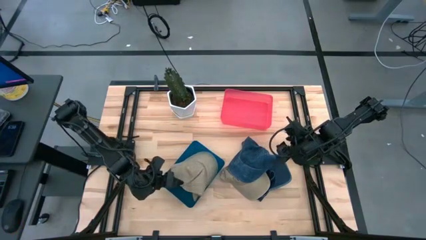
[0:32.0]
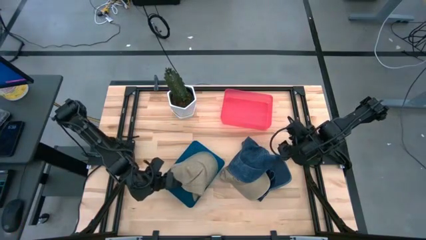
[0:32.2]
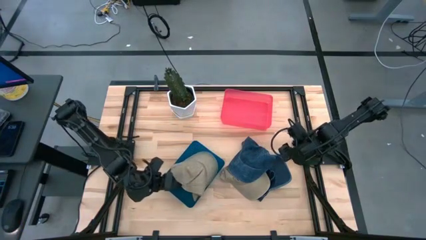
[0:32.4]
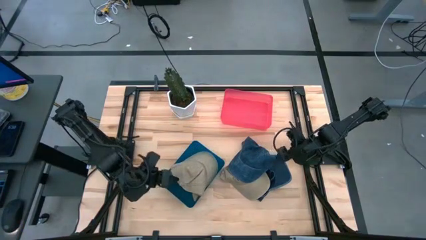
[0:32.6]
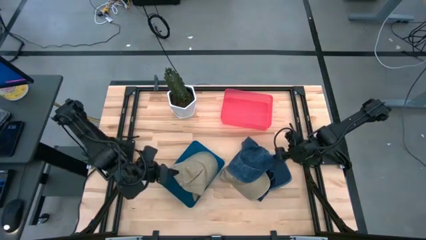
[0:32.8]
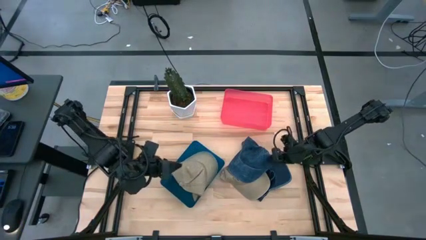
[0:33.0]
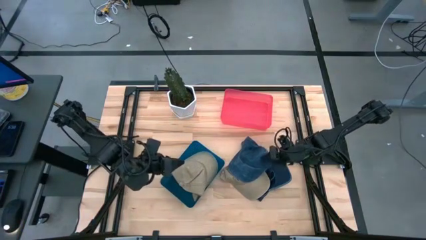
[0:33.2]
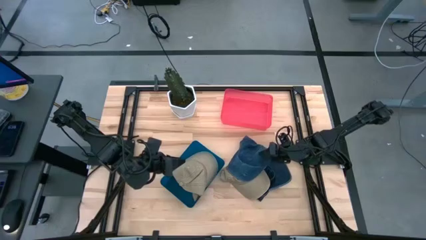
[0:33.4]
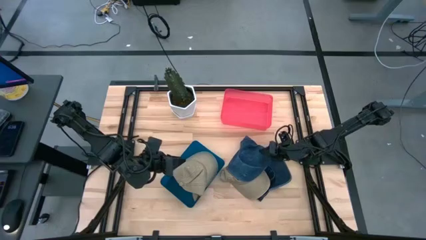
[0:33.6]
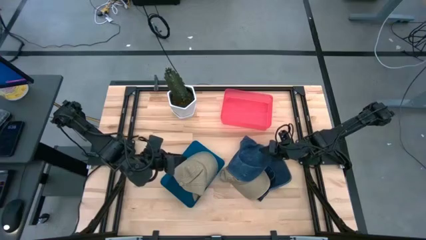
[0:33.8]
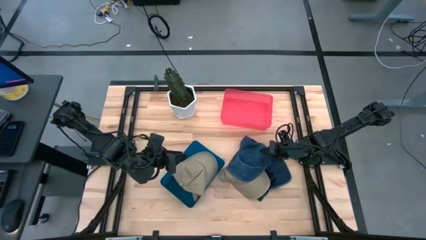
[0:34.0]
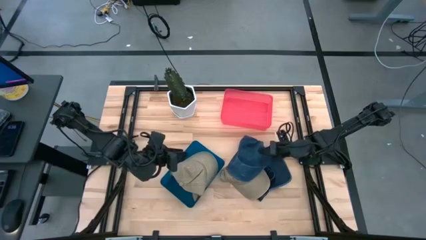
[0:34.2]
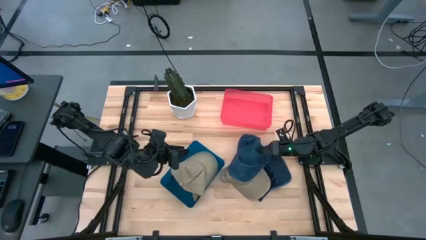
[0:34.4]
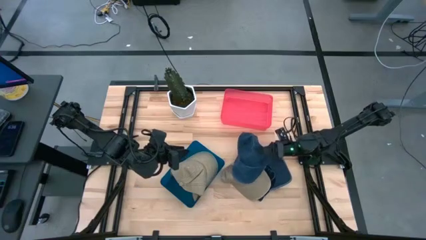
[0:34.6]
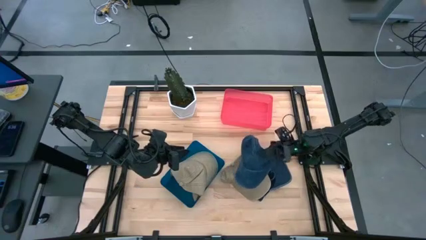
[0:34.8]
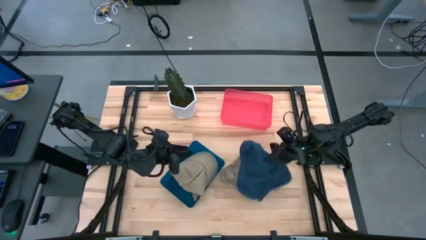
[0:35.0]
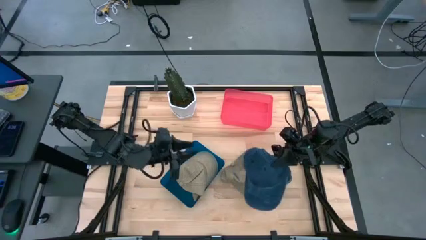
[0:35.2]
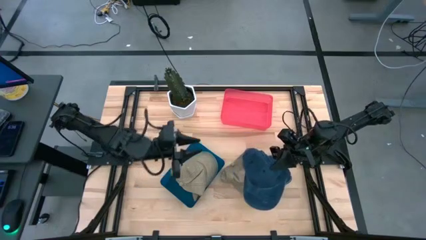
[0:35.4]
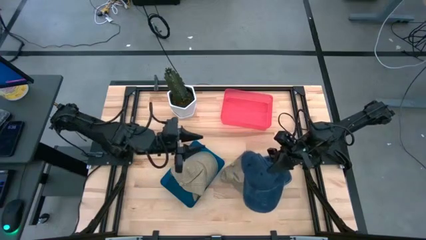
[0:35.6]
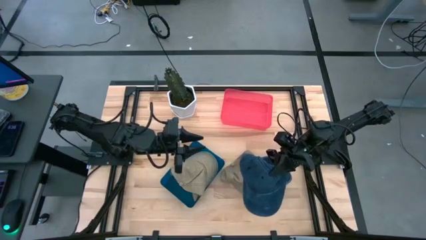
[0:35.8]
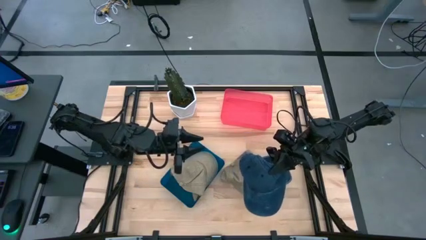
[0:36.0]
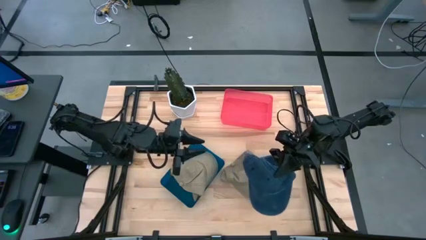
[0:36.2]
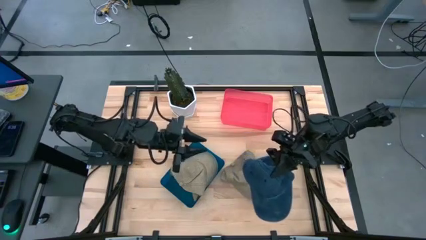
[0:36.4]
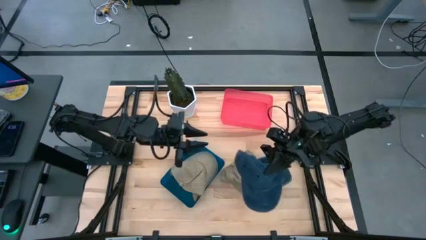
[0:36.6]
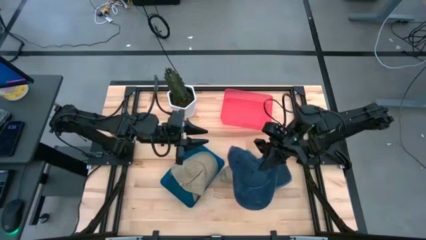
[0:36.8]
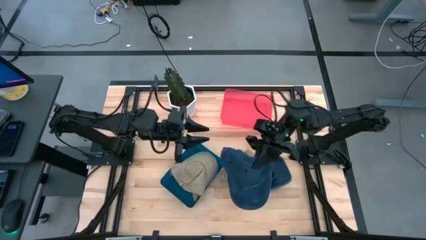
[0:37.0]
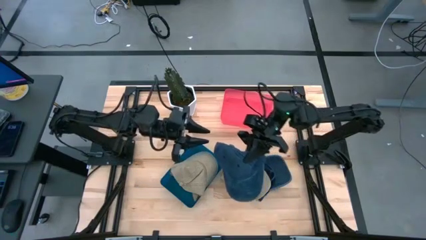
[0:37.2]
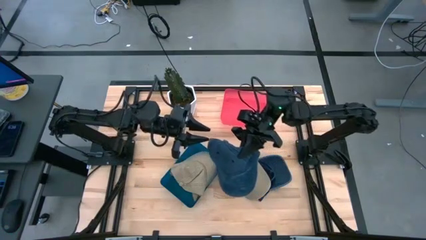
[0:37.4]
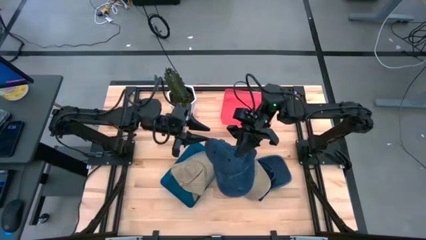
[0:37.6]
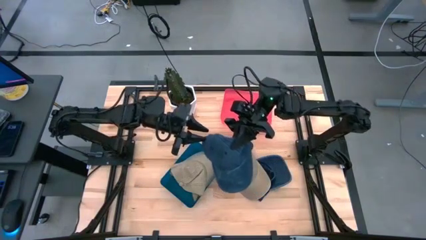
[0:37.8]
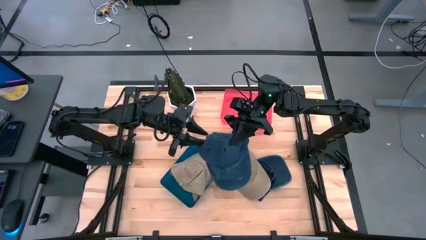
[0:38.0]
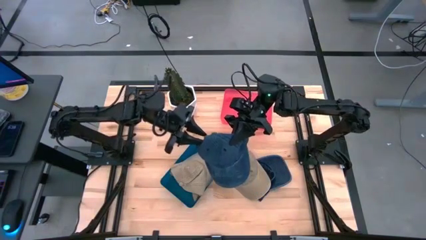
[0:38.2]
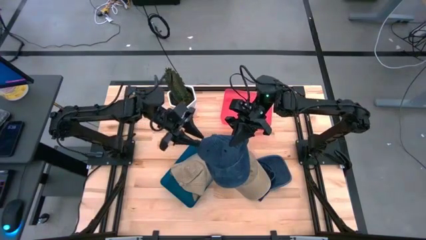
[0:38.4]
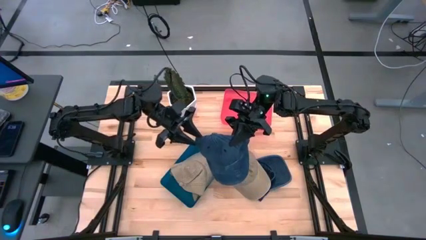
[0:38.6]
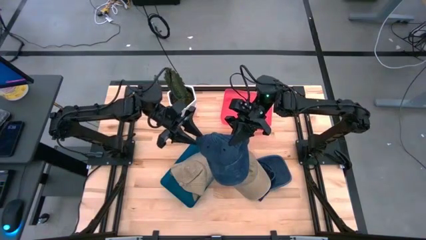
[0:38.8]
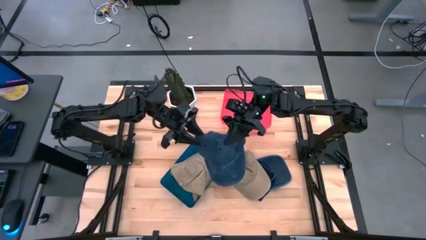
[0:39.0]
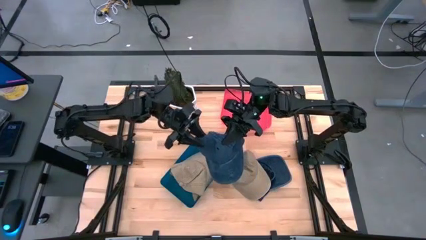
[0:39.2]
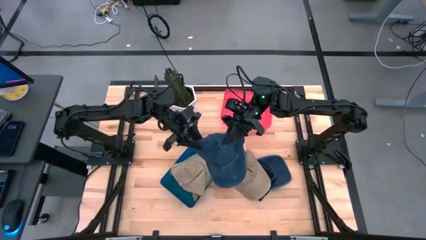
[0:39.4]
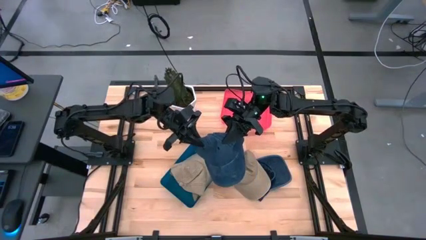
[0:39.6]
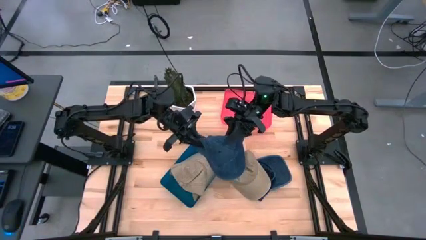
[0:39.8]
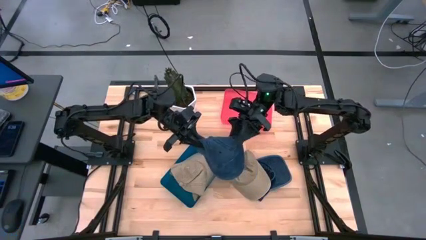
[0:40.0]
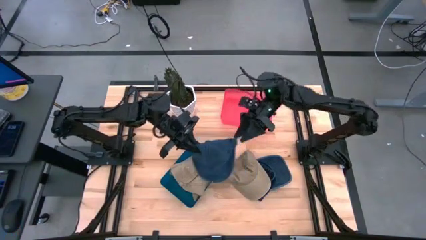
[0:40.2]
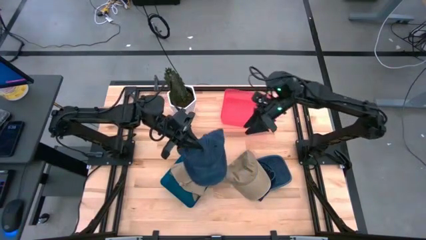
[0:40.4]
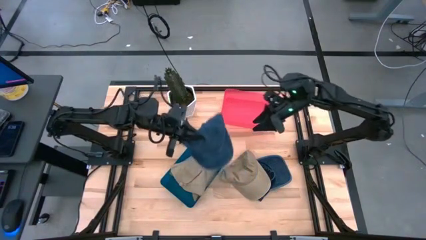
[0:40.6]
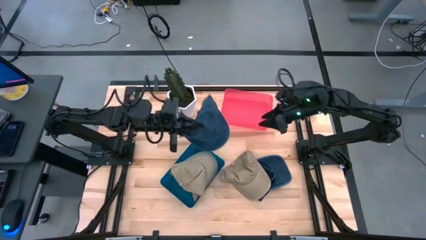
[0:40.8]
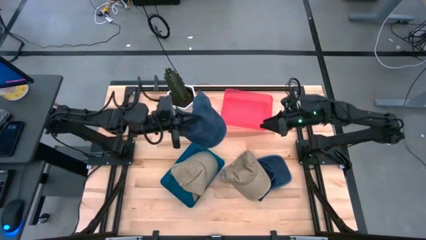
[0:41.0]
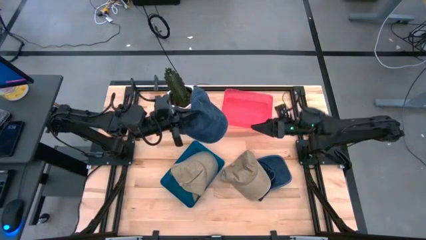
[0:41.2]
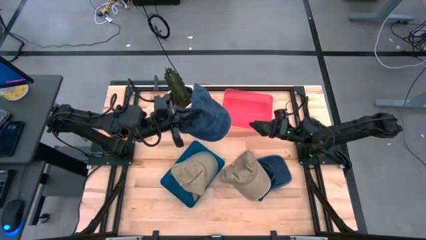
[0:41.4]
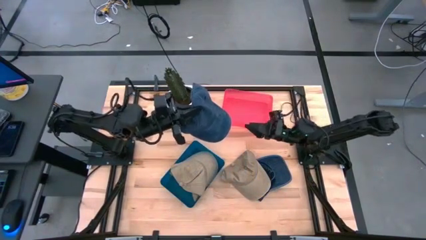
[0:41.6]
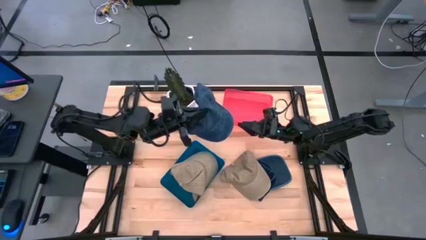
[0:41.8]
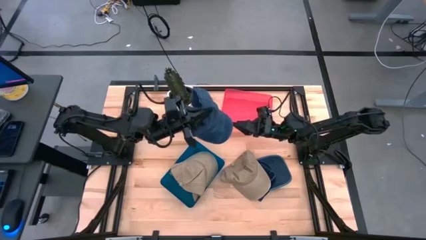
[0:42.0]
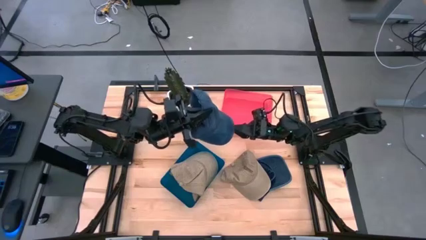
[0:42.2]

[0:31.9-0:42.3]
Task: Pick & Place hat
Put the blue cap into the red bin

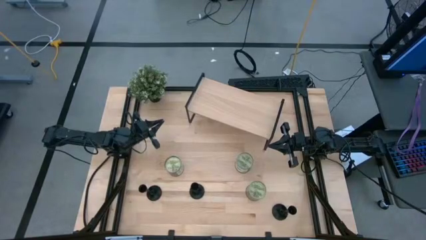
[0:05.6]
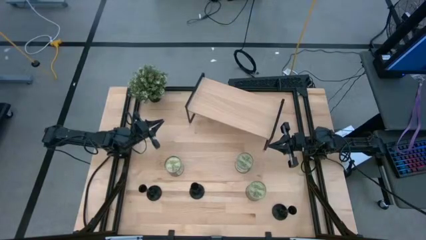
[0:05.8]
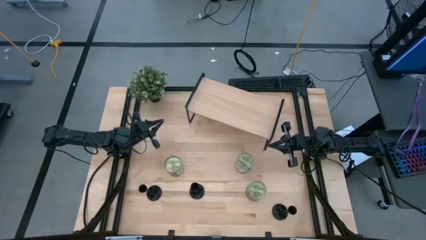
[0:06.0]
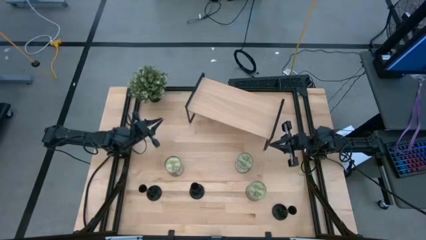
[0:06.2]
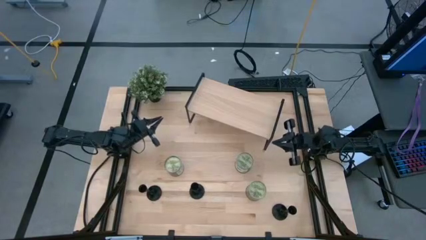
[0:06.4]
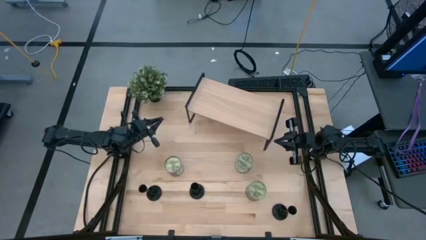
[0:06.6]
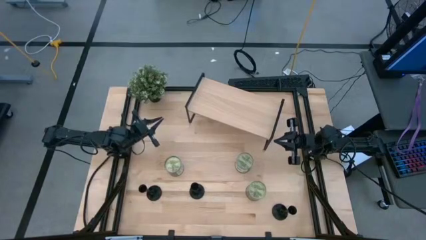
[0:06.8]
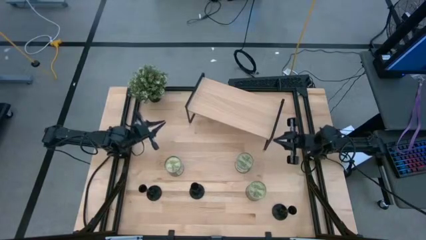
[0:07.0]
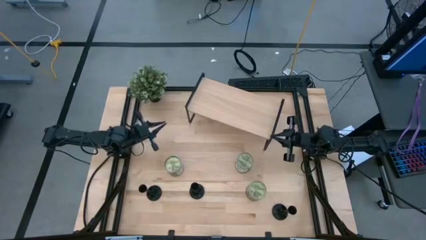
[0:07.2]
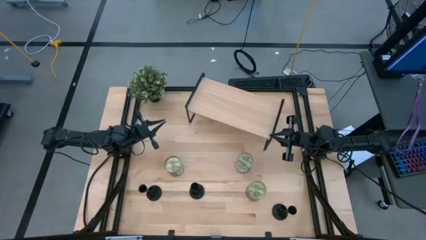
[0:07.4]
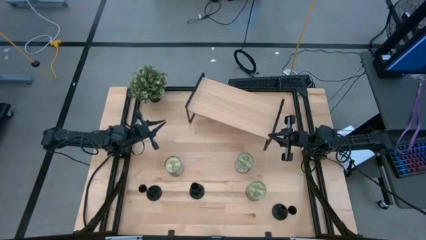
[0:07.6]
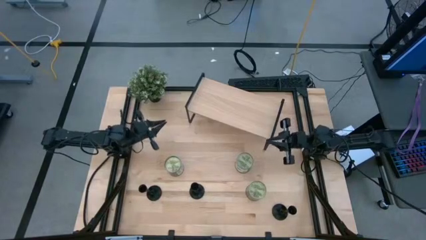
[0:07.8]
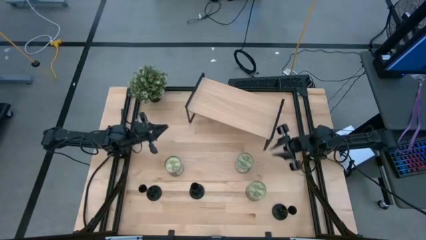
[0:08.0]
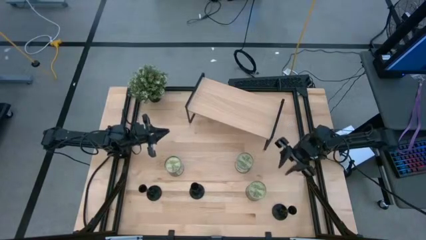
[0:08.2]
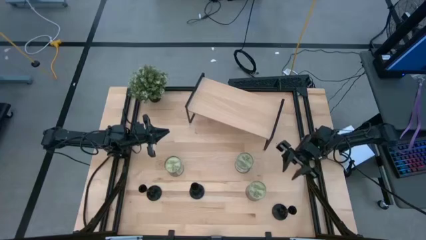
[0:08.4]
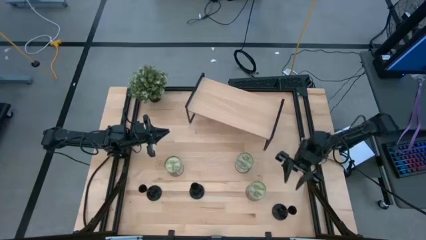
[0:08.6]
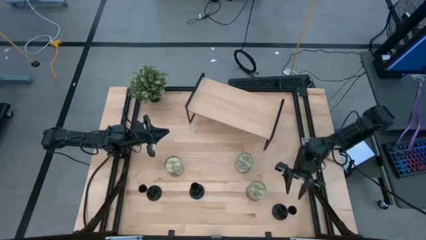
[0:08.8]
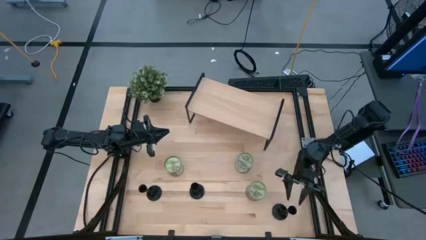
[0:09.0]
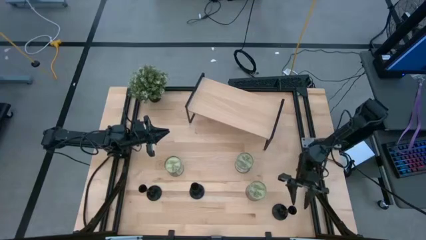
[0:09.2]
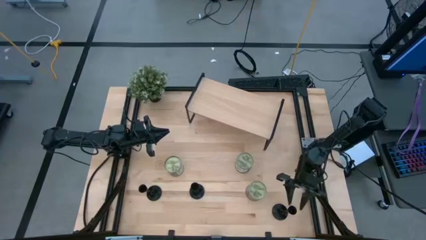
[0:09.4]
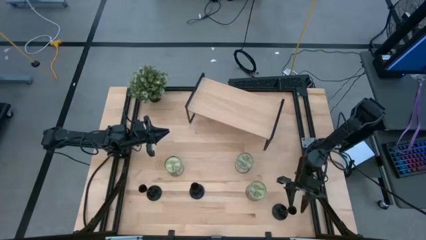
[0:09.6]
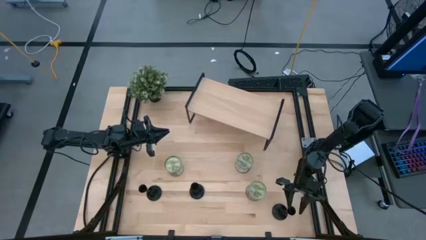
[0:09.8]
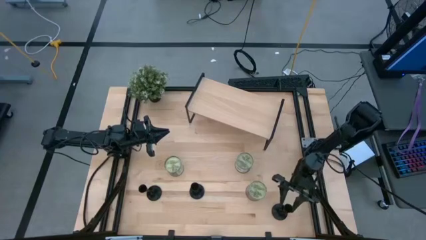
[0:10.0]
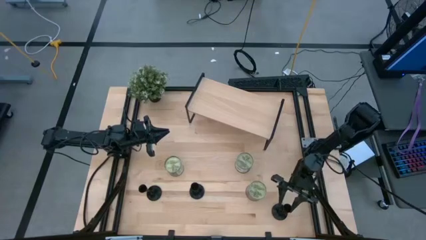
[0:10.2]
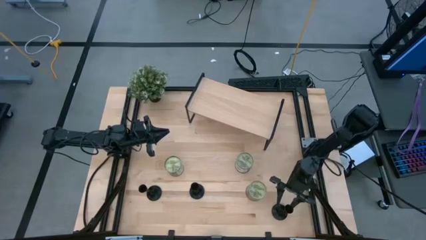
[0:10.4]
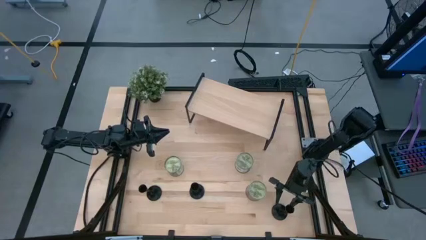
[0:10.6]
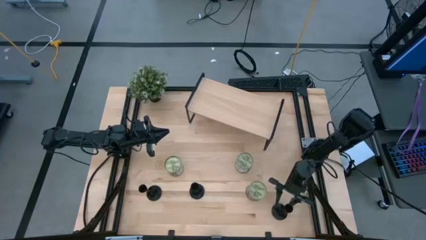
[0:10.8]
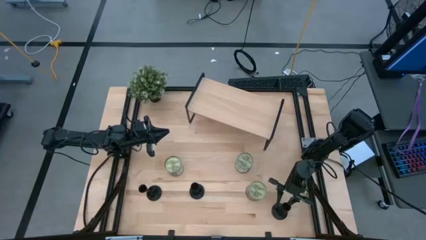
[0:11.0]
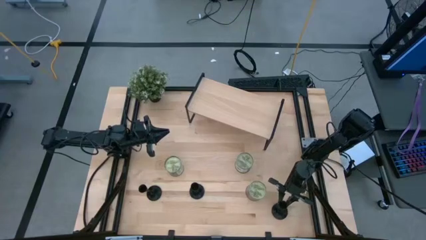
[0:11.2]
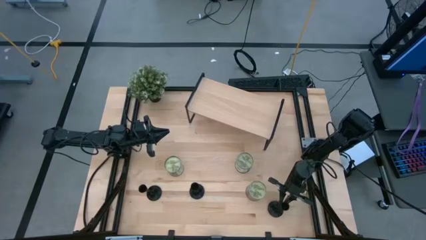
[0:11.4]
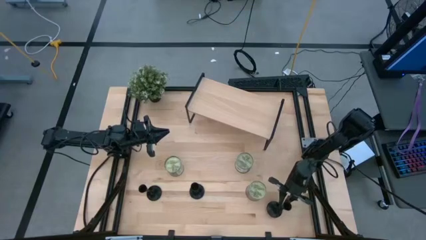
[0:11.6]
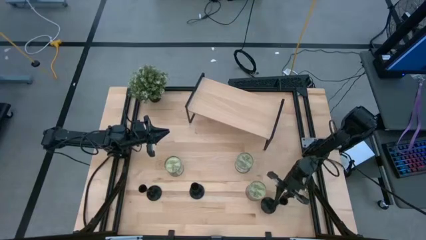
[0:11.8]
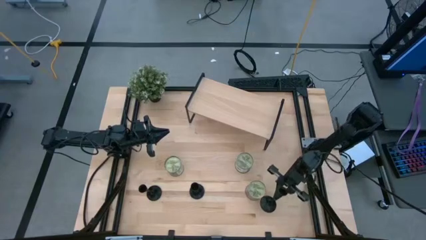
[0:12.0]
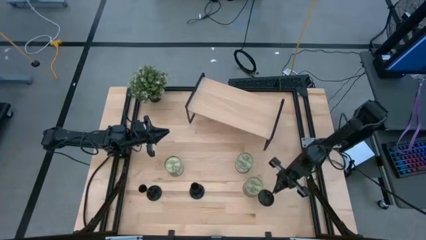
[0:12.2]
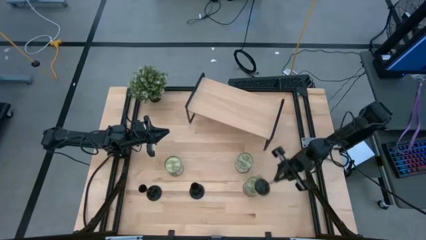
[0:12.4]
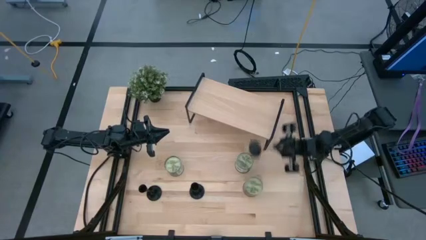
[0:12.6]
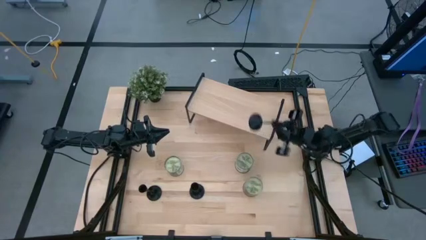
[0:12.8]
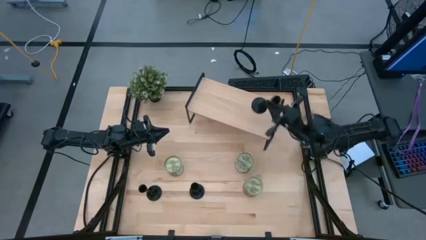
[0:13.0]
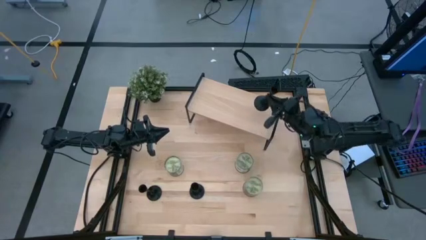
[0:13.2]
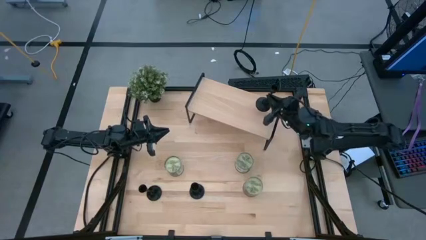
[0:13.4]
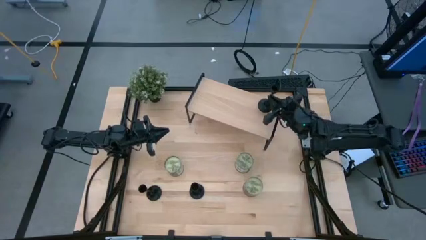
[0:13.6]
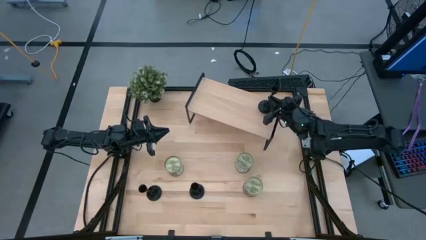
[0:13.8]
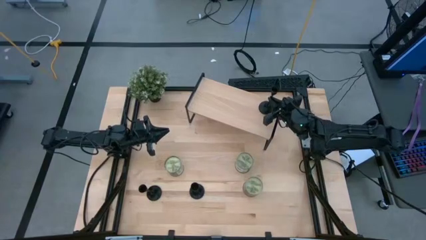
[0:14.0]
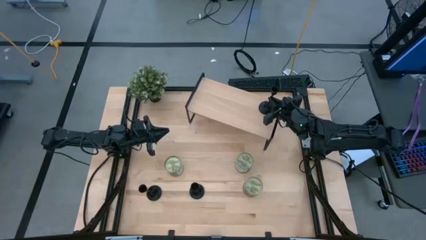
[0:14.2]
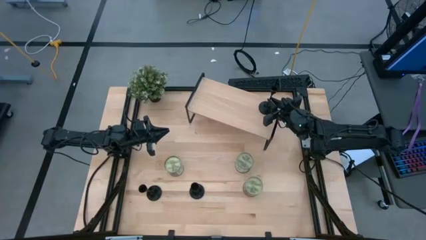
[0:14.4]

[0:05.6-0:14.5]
Task: Pick & Place candle stick holders
Put the right black candle holder on the shelf
